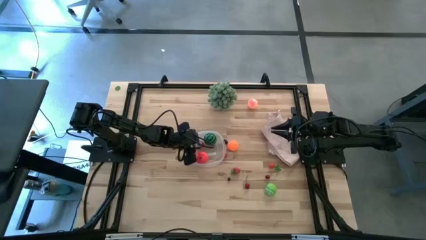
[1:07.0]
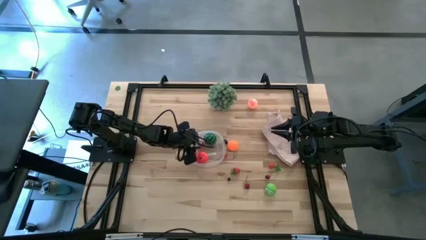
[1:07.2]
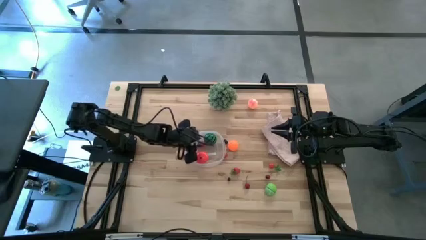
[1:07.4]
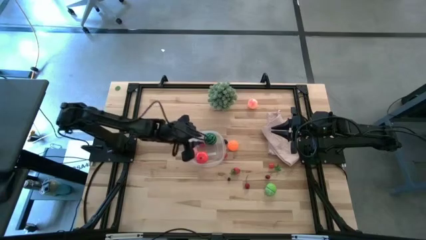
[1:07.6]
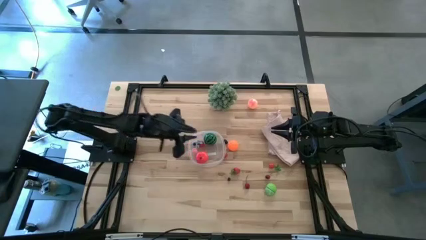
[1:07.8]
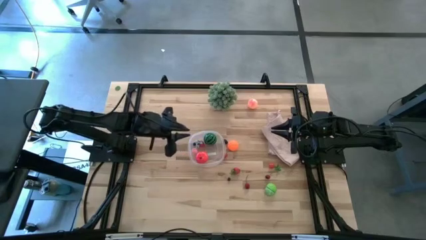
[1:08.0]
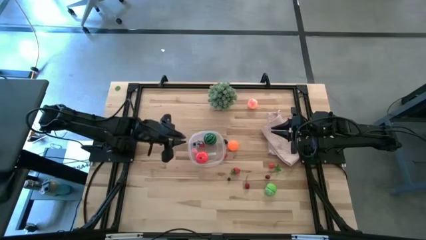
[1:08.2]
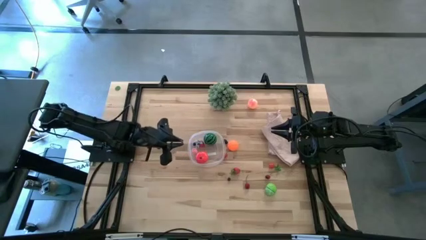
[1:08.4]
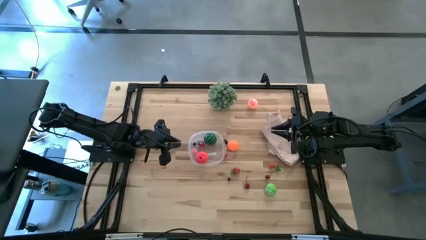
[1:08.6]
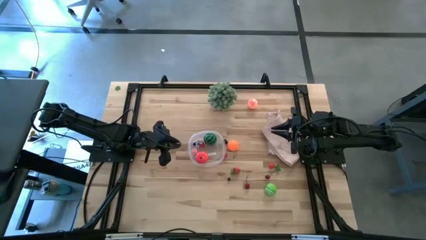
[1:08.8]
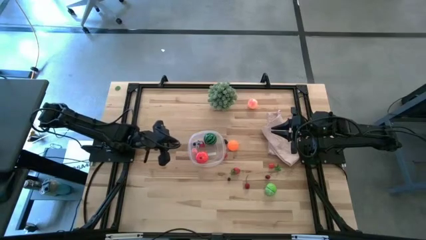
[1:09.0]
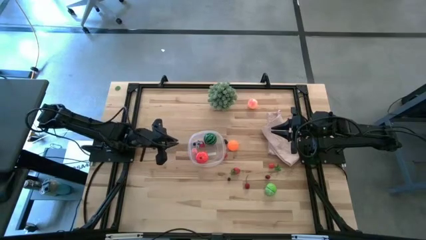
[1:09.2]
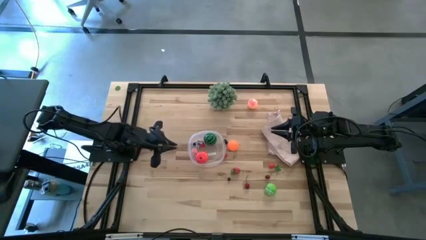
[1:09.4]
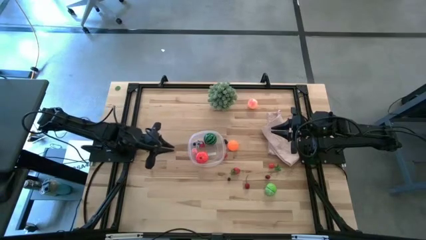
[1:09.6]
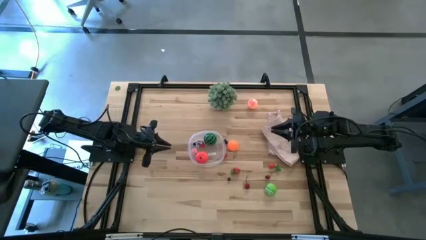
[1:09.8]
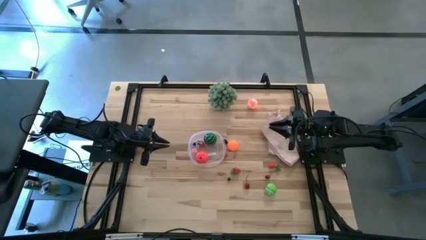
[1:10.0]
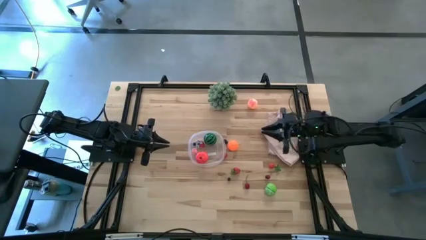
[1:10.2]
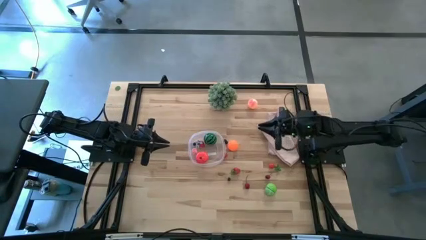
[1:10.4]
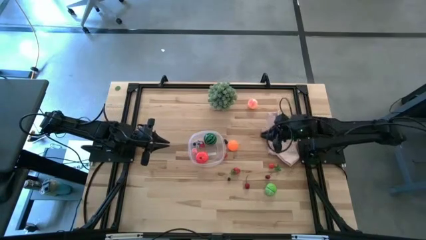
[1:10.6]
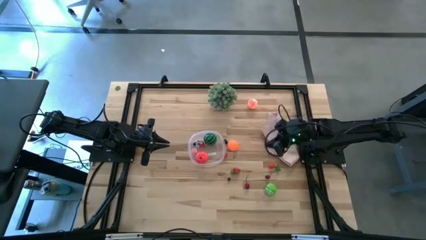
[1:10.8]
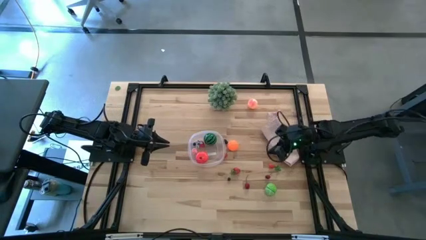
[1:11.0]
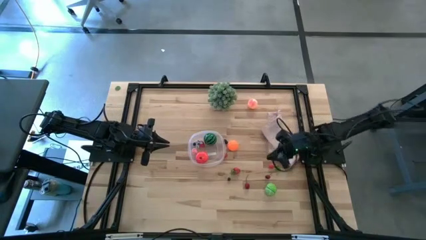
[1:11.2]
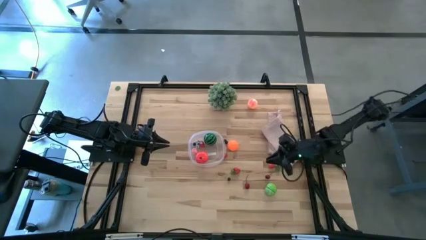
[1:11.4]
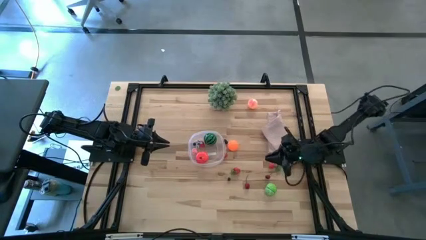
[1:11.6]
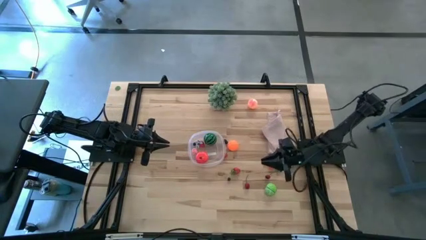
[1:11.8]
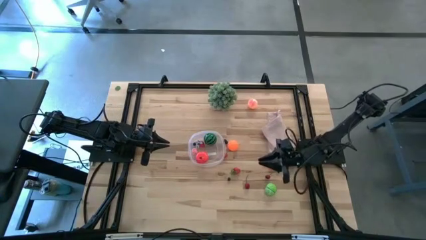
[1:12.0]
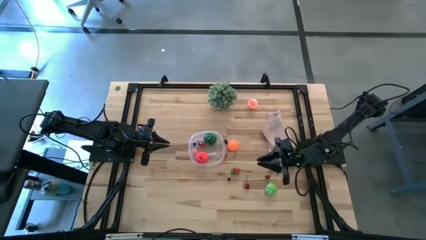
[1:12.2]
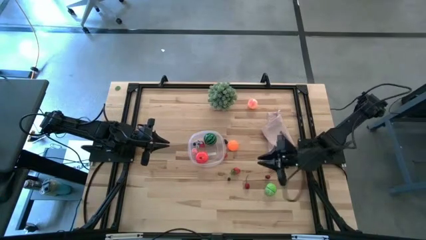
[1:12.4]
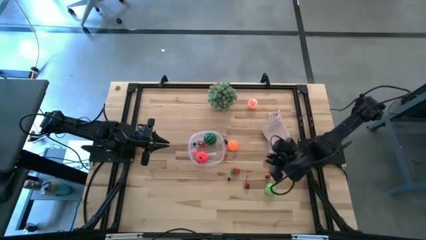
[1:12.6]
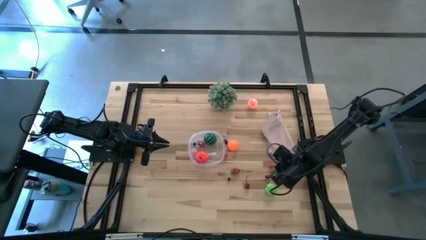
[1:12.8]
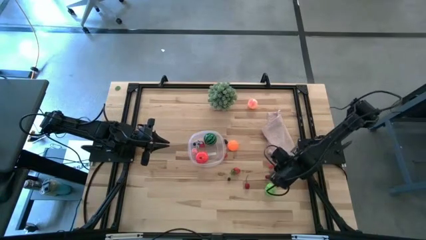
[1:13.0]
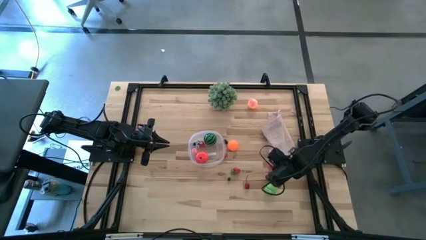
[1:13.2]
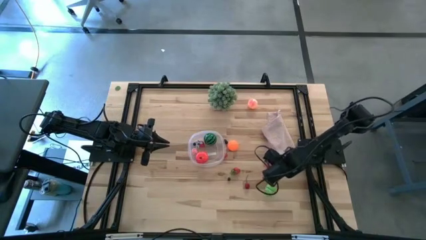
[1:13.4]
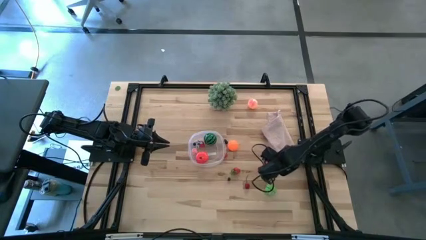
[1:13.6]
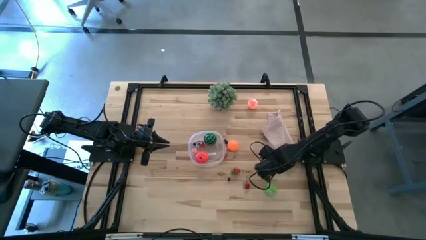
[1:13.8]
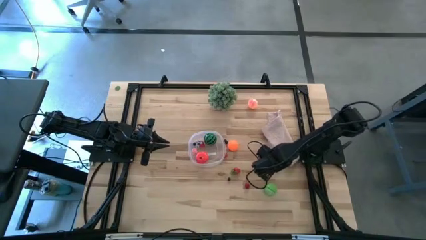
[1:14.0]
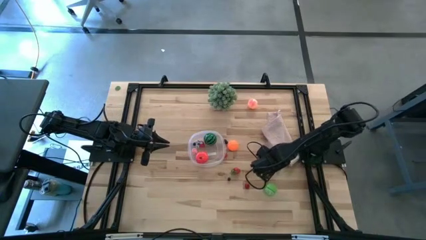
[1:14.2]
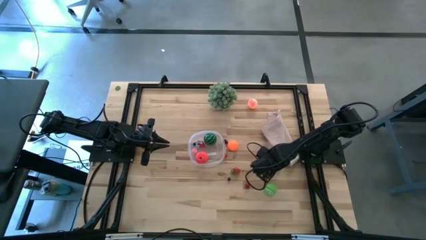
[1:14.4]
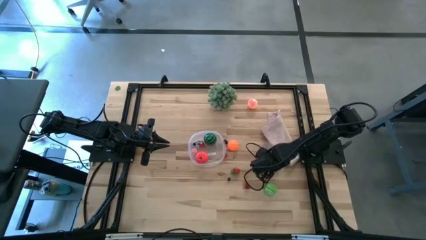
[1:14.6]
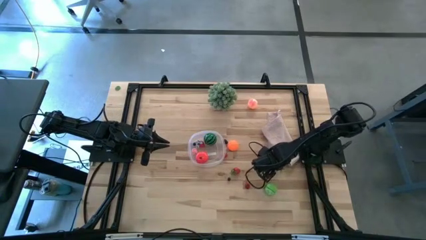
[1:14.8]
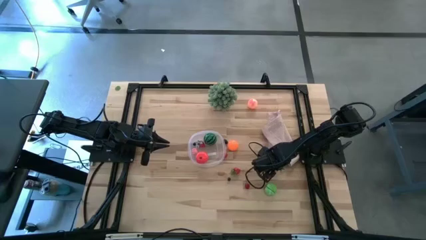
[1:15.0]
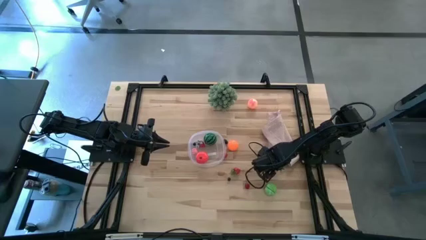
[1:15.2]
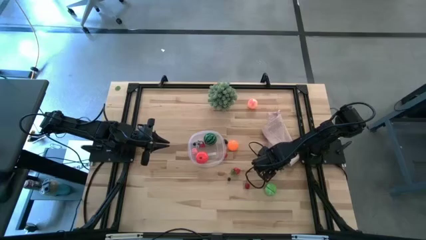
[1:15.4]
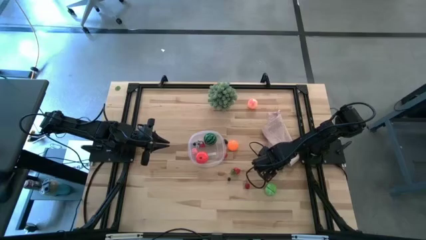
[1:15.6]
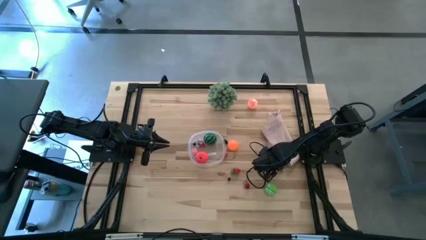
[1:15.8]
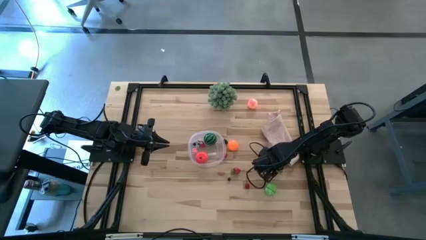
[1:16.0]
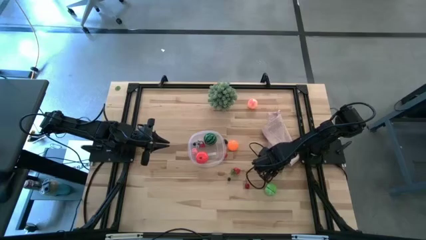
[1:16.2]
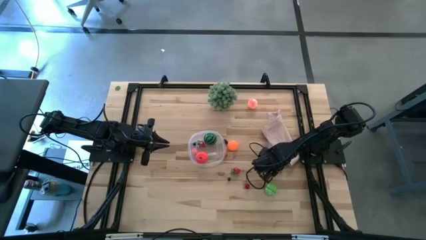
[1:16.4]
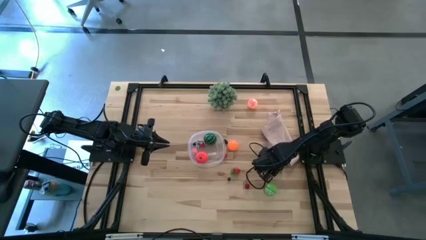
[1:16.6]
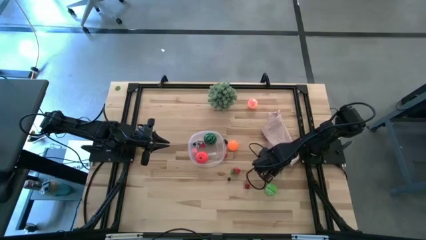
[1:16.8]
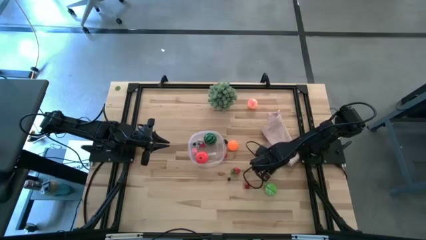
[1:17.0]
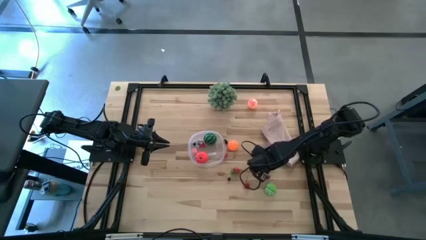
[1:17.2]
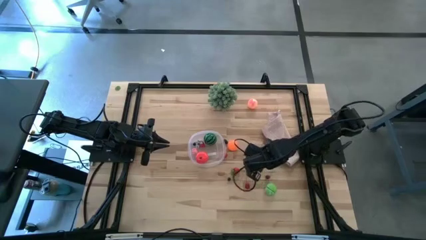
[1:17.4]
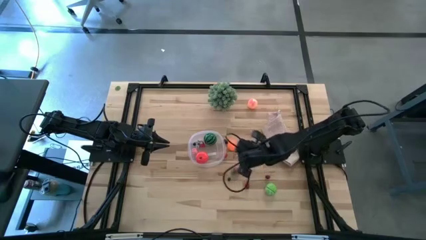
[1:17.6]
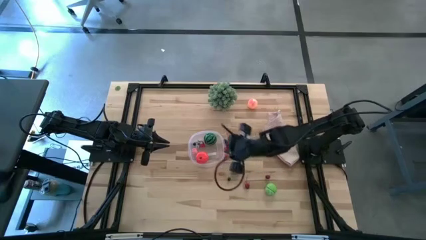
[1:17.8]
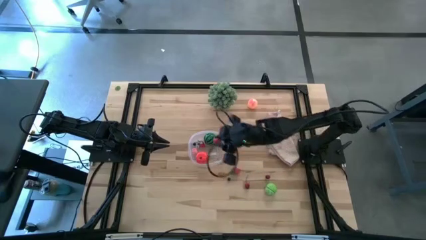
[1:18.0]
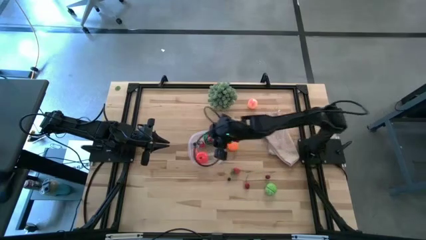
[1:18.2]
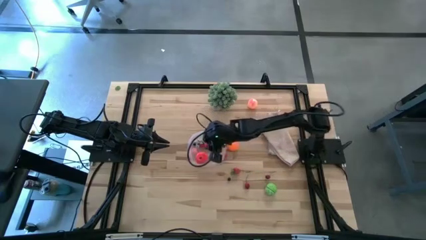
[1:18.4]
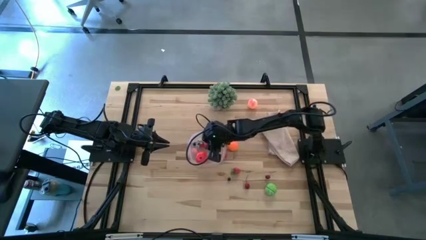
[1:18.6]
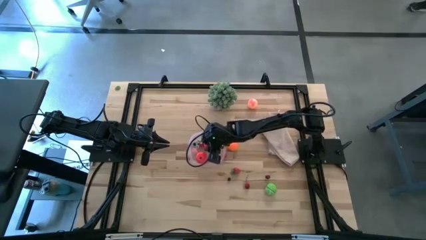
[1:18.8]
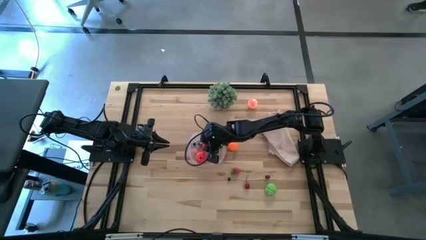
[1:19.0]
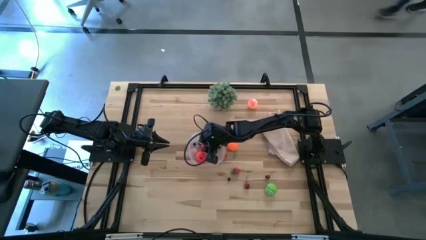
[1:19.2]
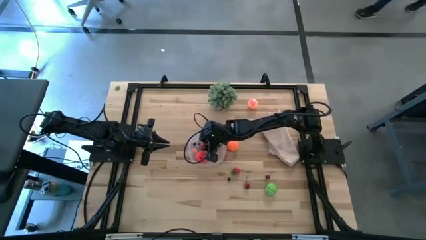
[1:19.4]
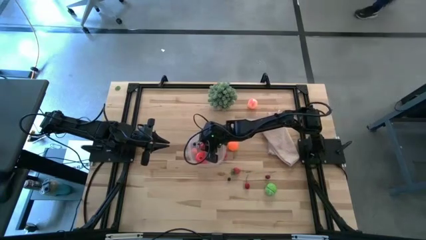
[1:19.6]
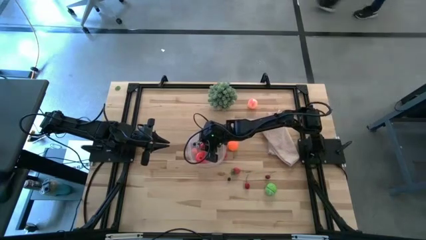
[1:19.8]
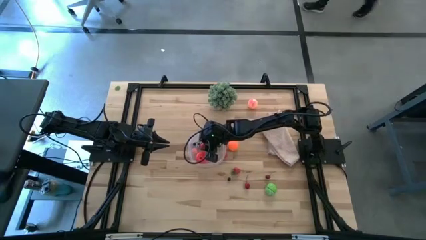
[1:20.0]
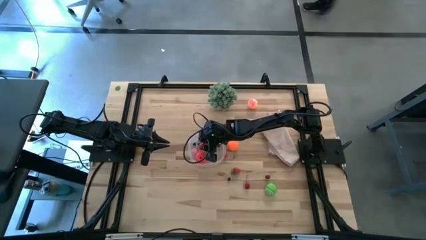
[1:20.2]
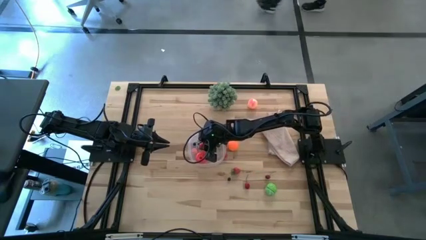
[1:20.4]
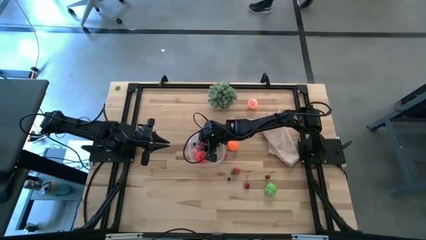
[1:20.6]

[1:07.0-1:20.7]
Task: Pick and placing Produce into tupperware
Put the red cherry tomato into the transparent bin

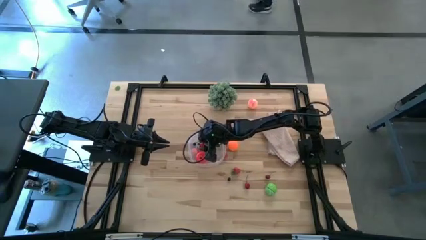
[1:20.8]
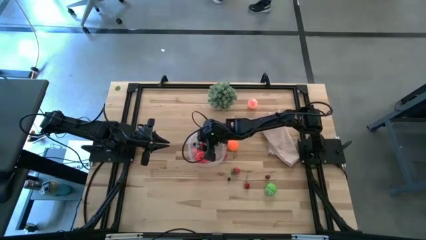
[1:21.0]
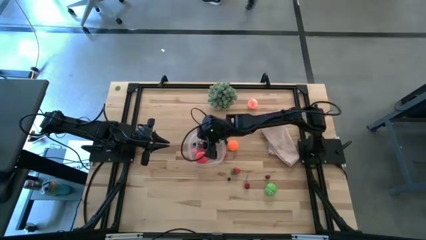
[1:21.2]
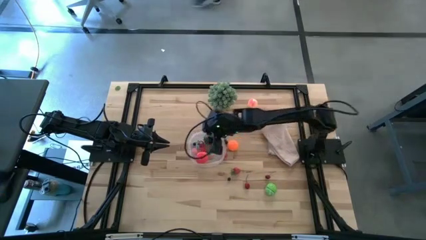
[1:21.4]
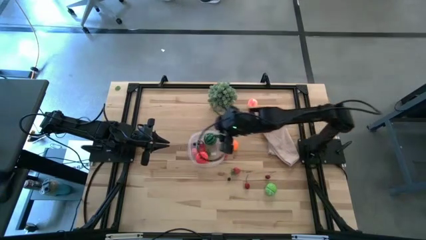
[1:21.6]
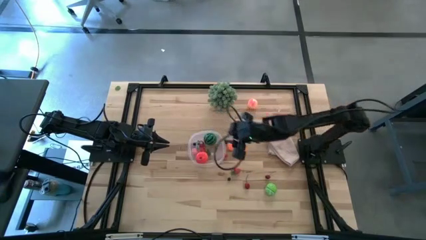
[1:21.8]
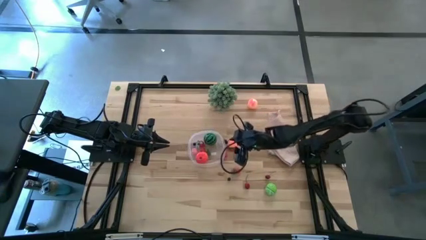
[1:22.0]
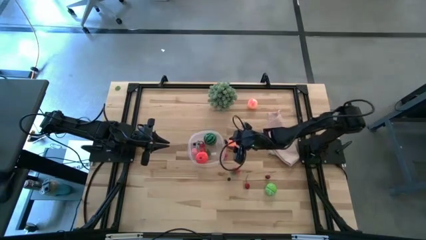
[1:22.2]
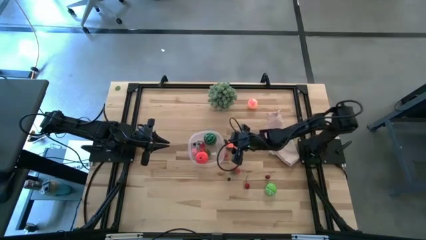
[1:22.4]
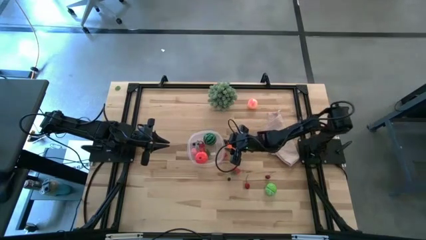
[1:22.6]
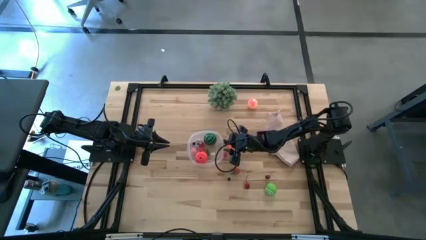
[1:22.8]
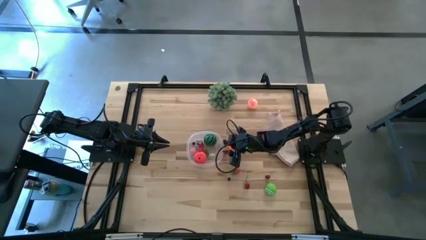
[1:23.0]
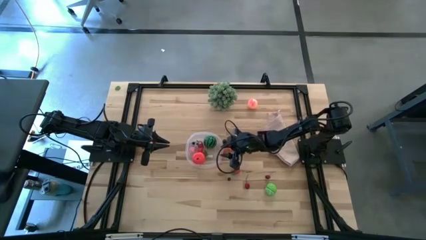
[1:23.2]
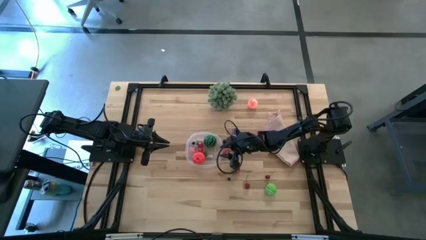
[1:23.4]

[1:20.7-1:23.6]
Adjust the transparent bin on the table
